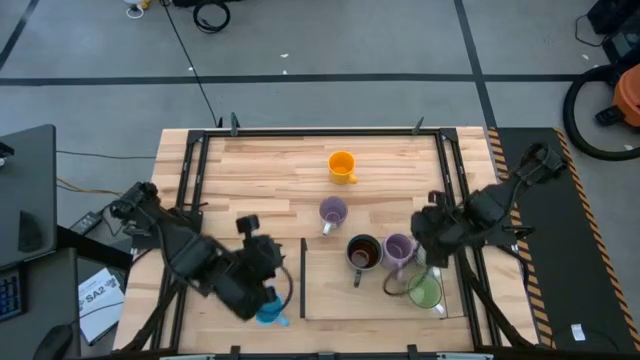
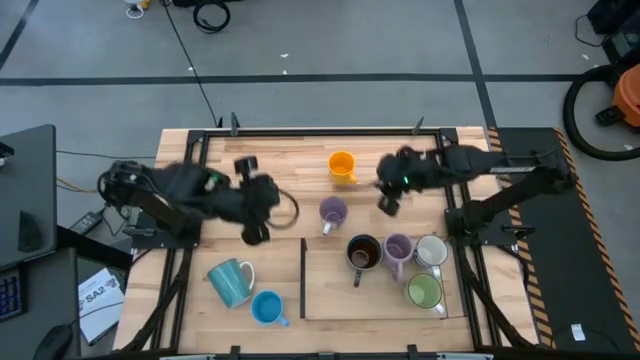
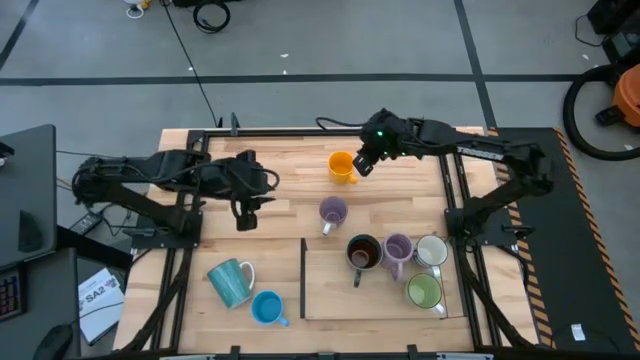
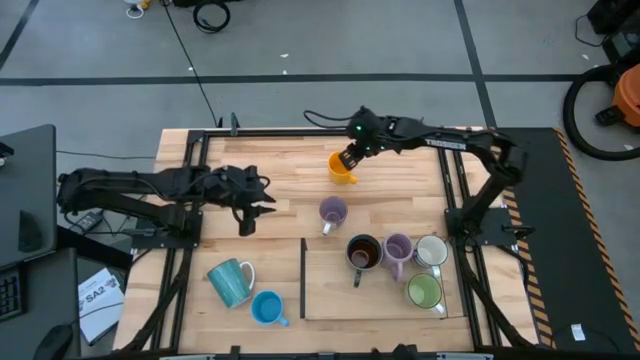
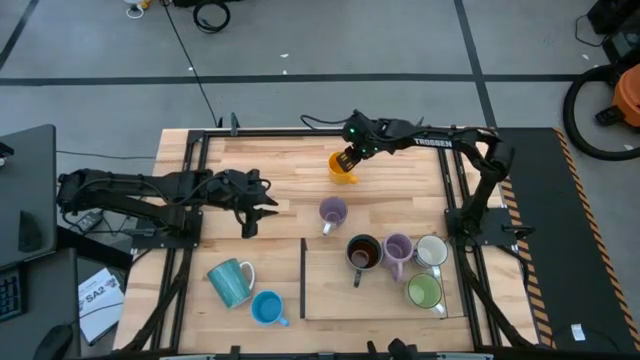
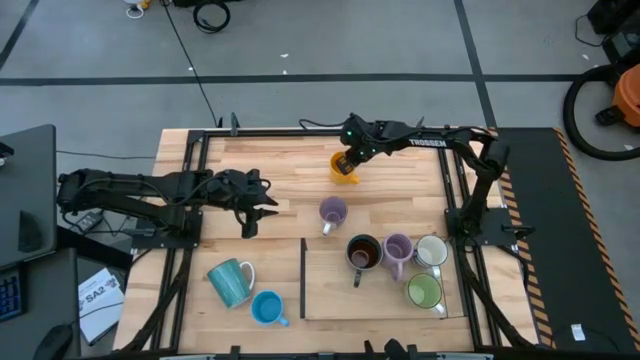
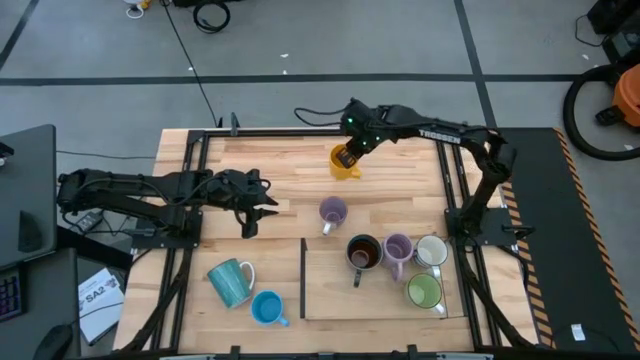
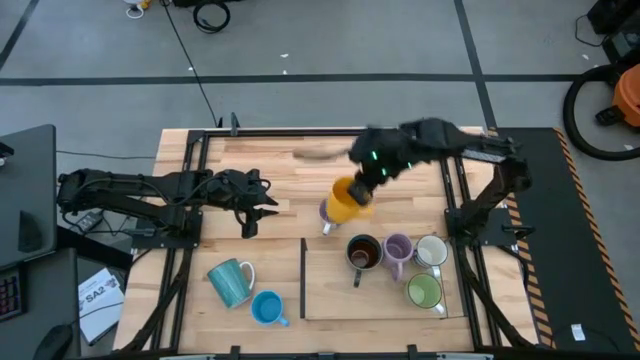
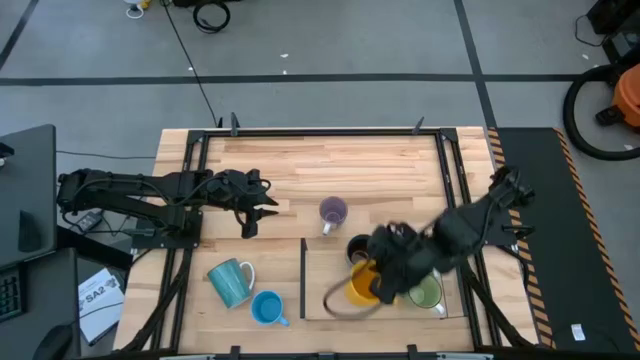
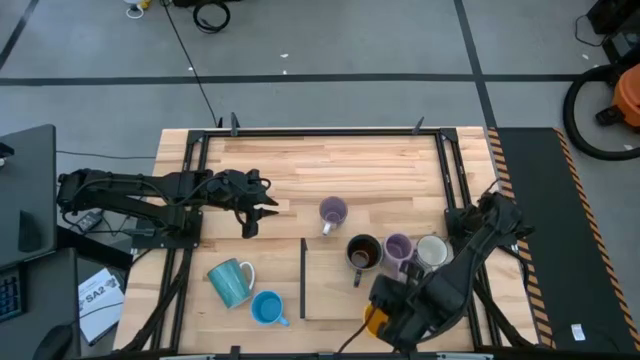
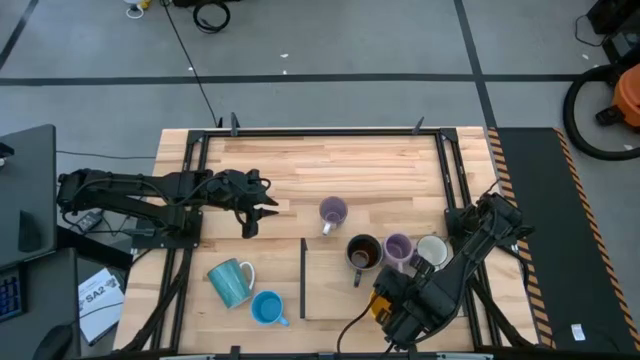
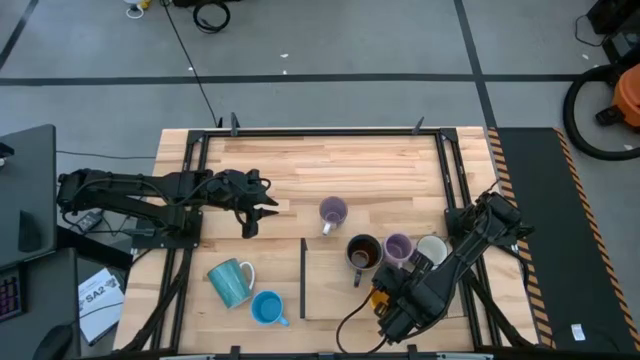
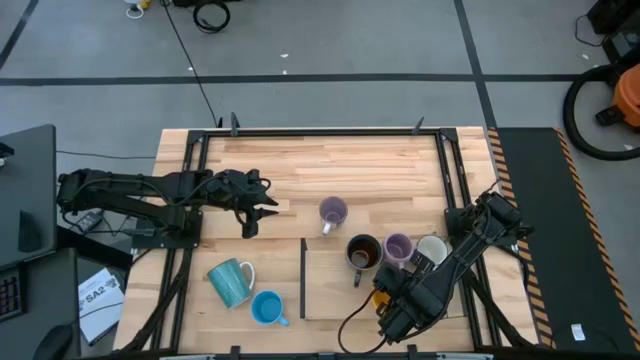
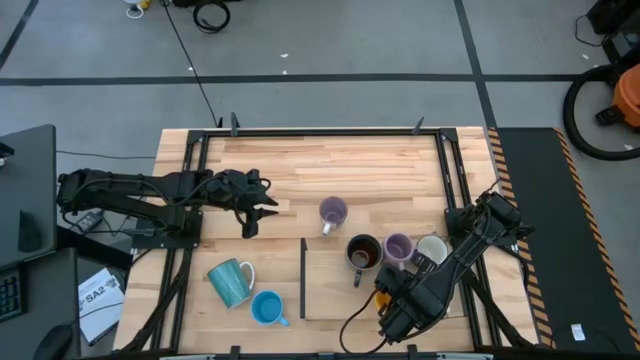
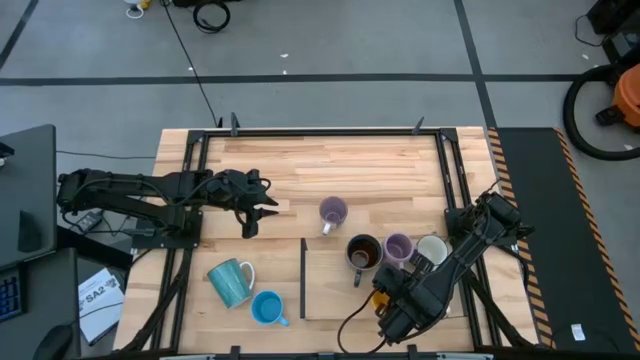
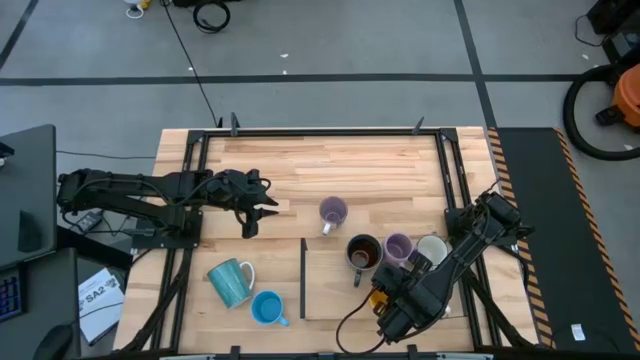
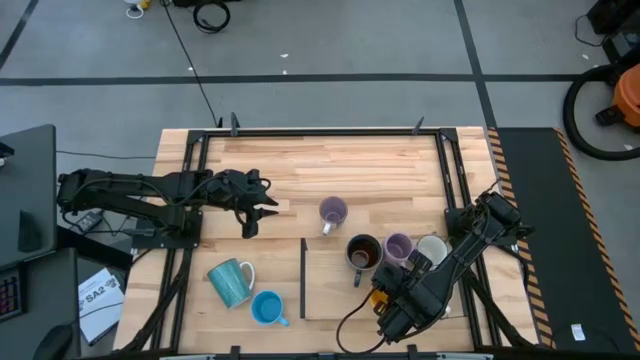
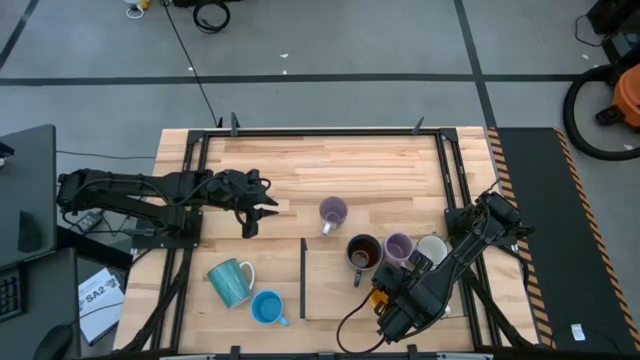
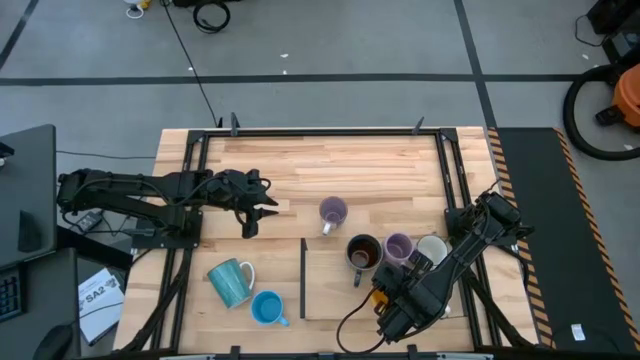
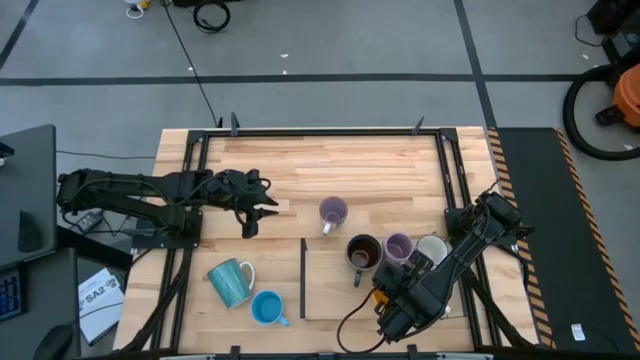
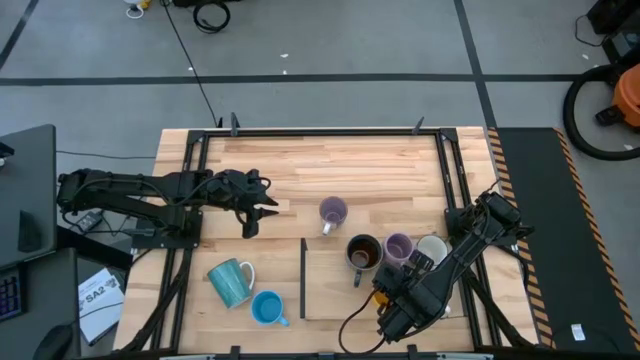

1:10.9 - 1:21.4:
Task: Place coffee mugs
Stack the yellow mug on the shelf aligned with the purple mug

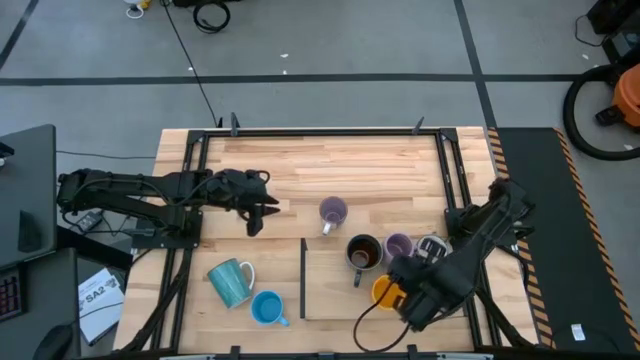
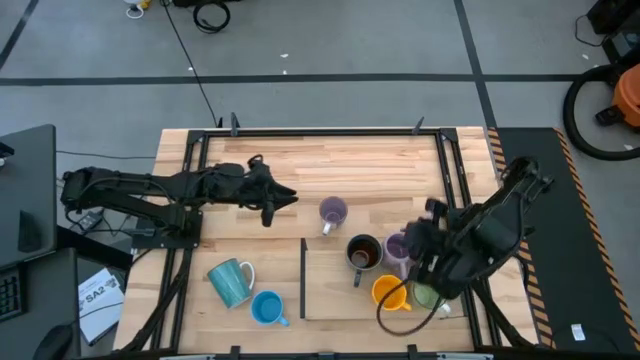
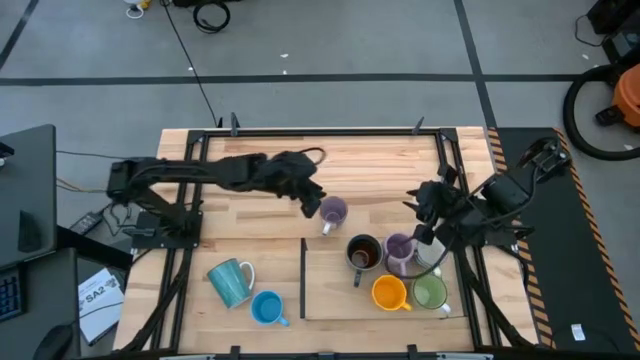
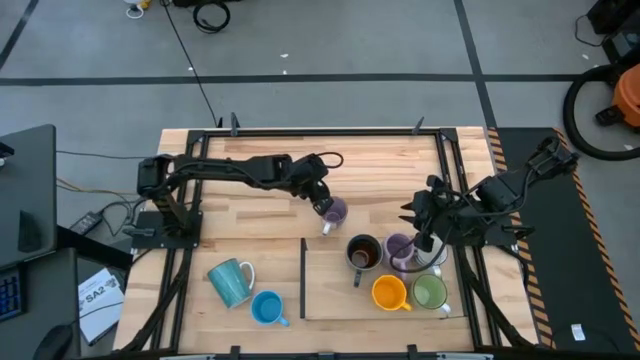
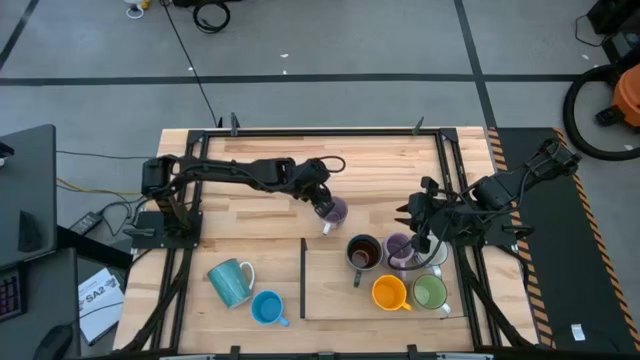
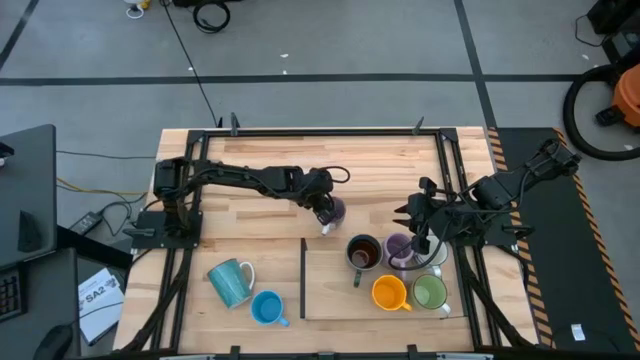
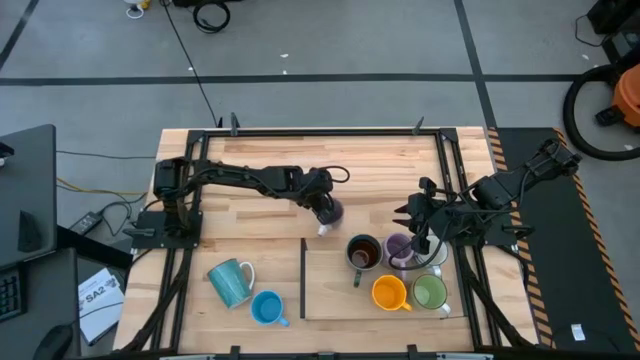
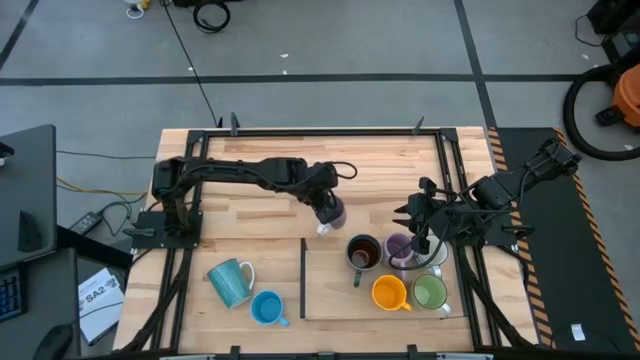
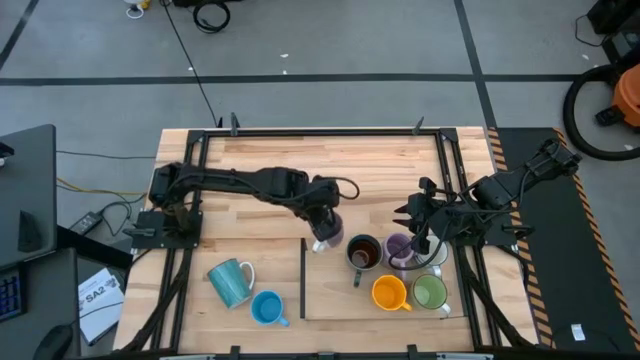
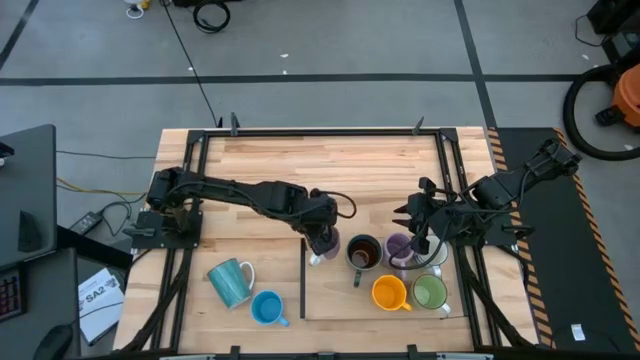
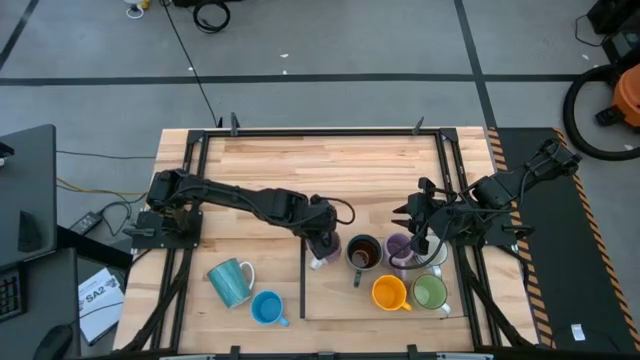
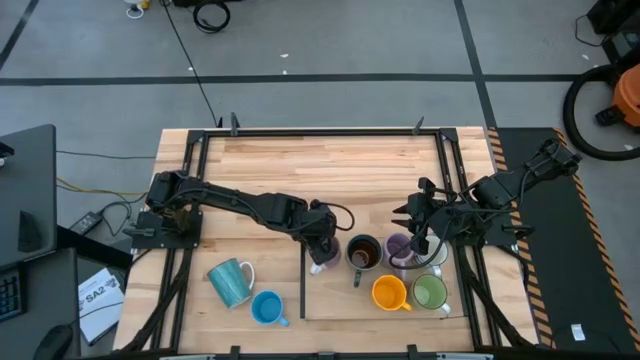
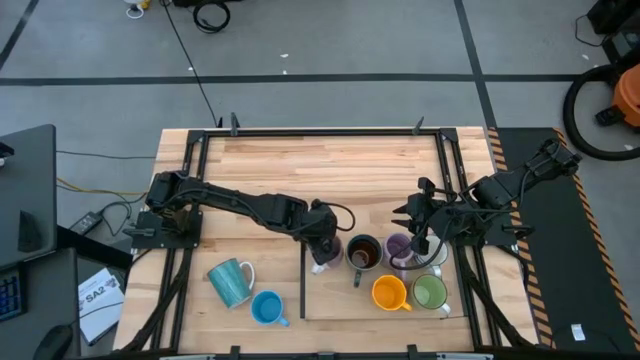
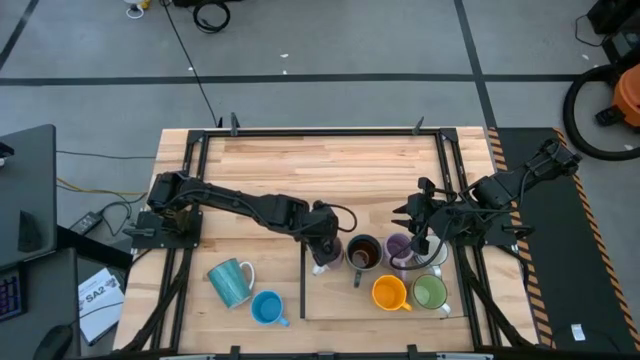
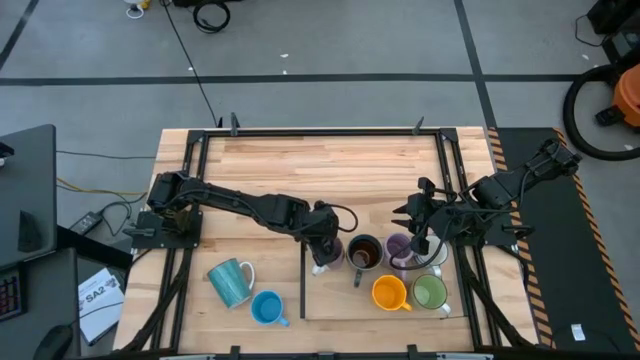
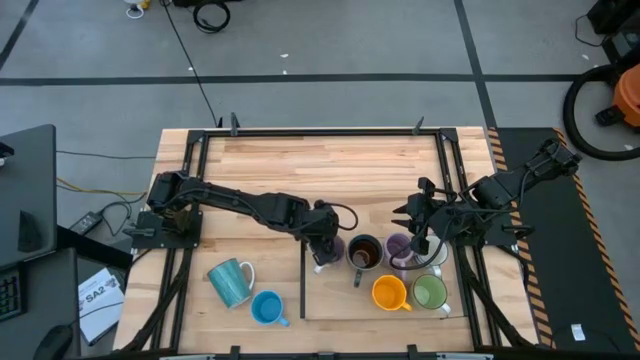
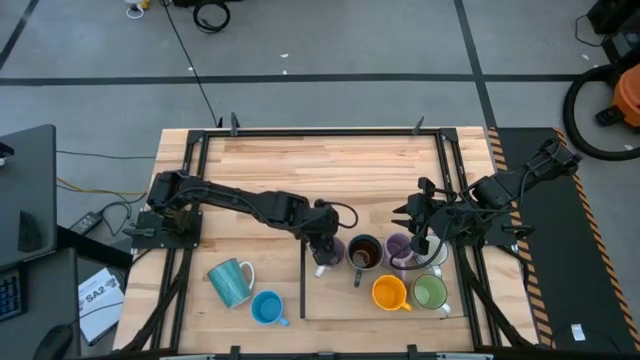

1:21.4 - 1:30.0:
Put the purple mug on the shelf
